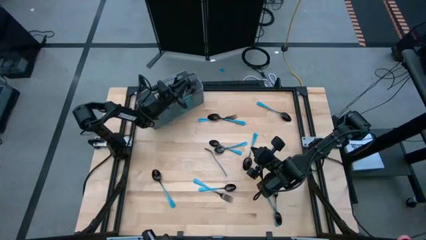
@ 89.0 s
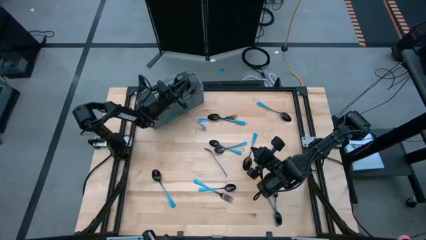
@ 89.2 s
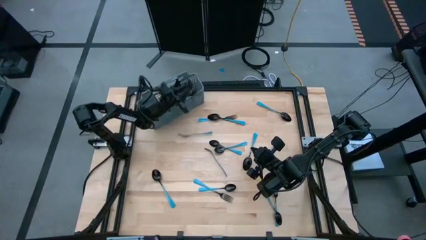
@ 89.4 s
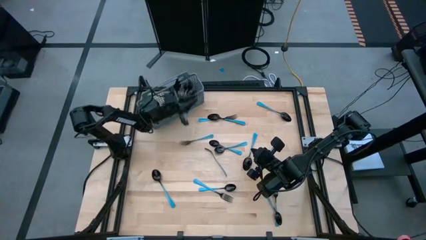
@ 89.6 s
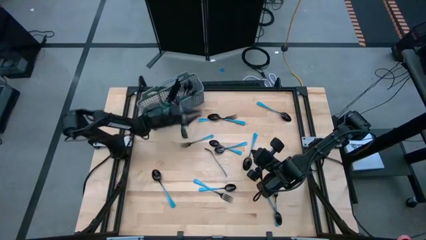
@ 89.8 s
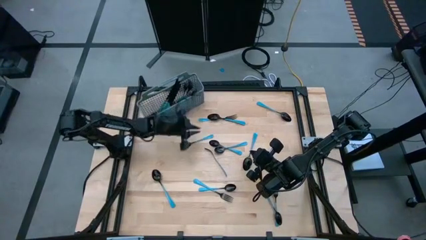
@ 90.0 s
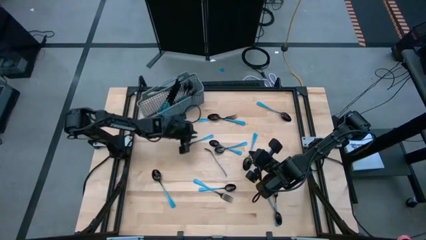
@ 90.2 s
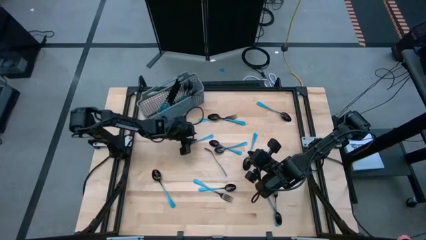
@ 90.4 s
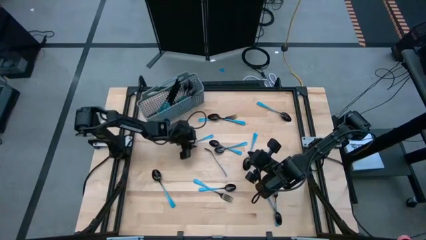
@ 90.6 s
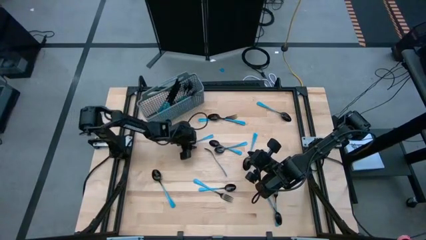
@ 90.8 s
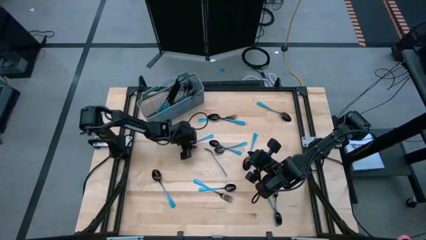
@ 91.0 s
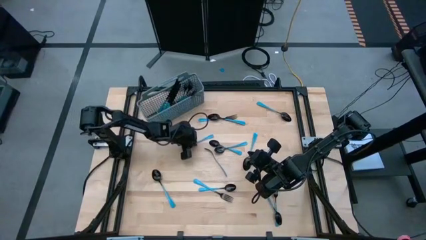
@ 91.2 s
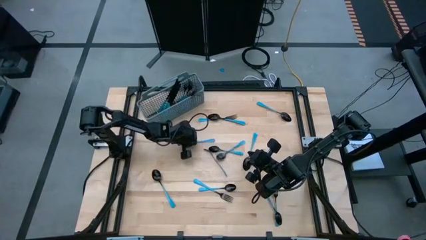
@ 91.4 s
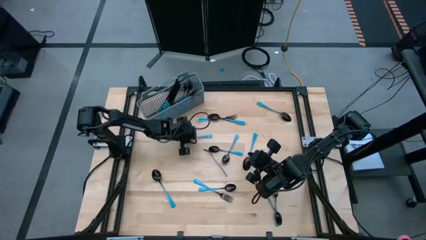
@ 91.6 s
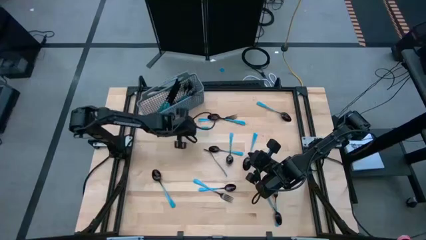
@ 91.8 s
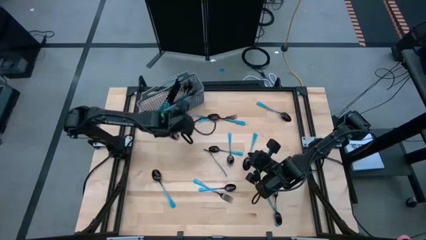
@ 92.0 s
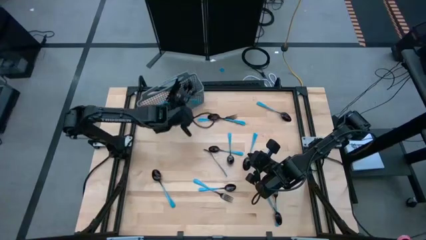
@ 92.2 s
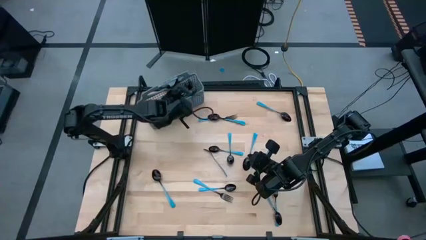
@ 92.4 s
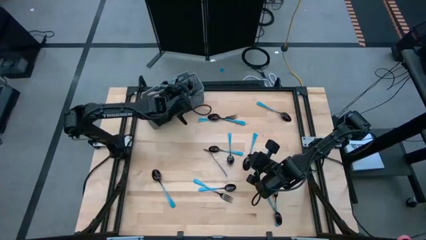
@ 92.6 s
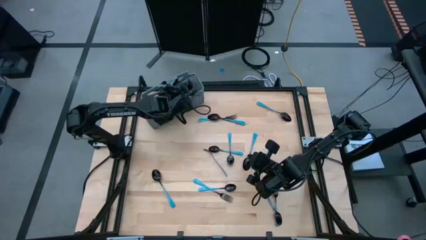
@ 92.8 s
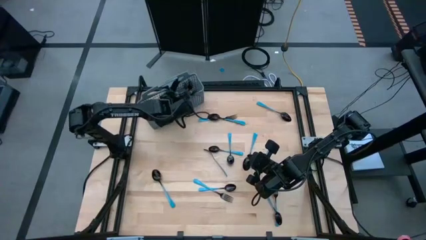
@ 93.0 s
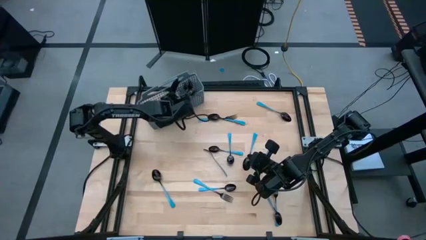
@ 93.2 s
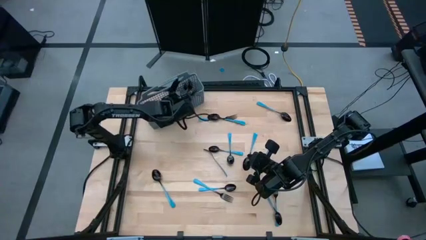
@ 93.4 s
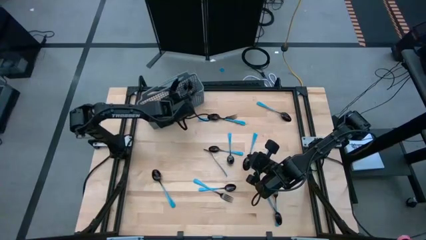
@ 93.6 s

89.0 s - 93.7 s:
Task: Sort silverware
Put the blue fork in the silverware rack

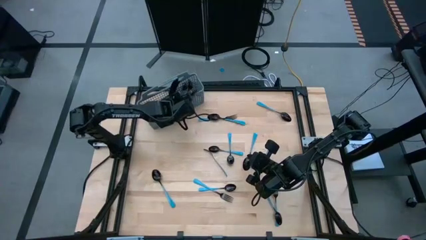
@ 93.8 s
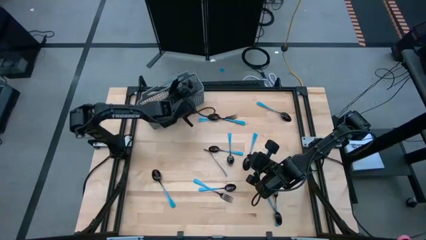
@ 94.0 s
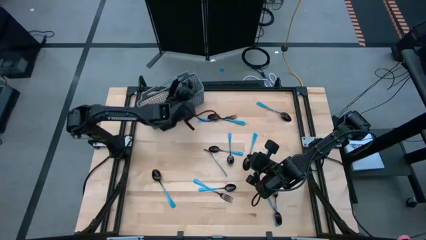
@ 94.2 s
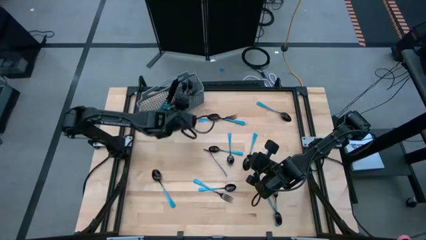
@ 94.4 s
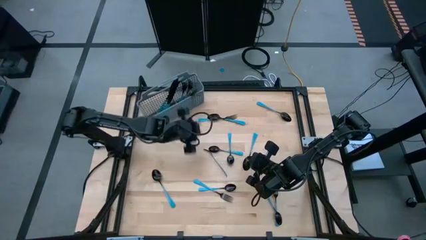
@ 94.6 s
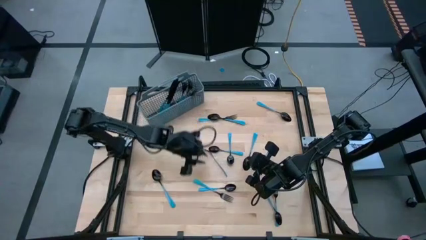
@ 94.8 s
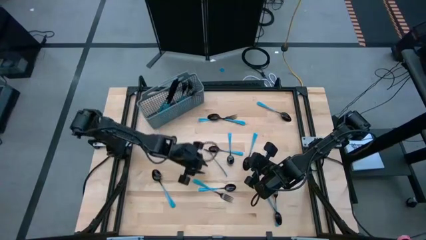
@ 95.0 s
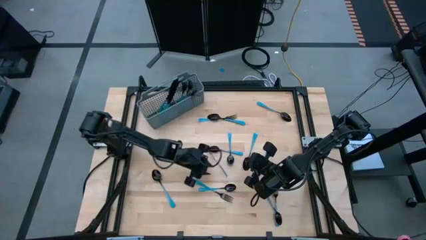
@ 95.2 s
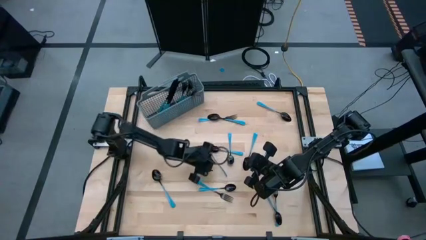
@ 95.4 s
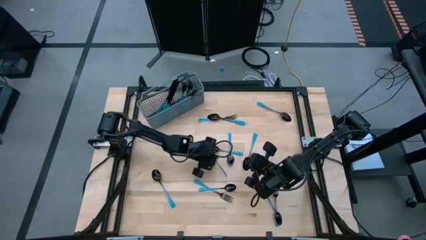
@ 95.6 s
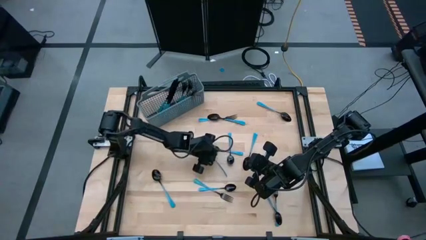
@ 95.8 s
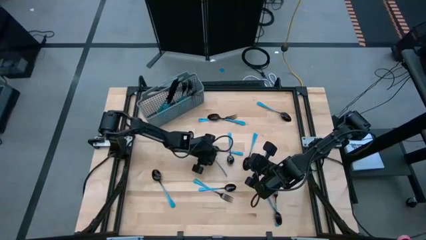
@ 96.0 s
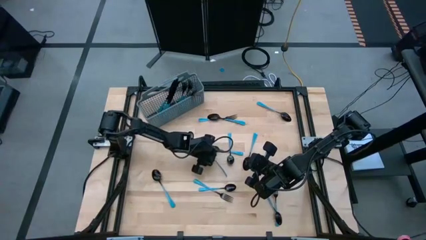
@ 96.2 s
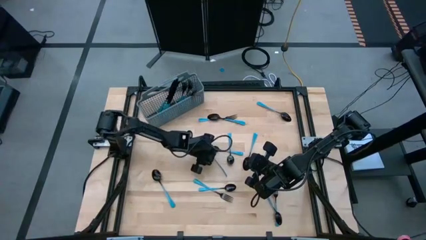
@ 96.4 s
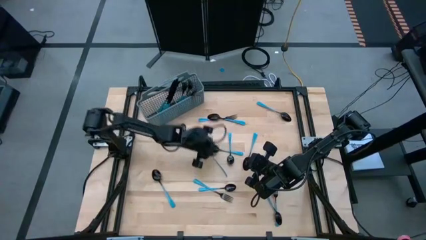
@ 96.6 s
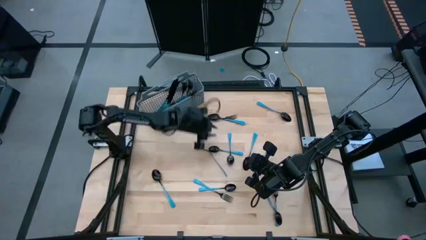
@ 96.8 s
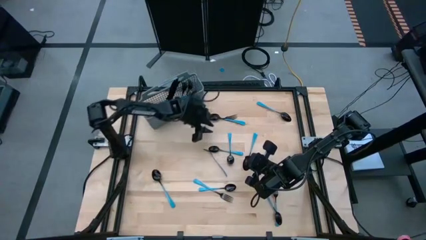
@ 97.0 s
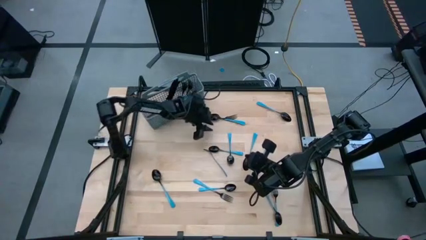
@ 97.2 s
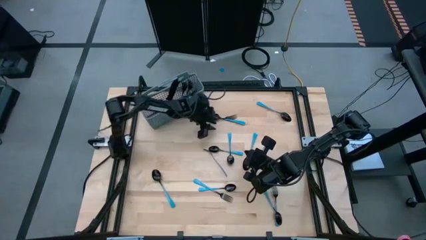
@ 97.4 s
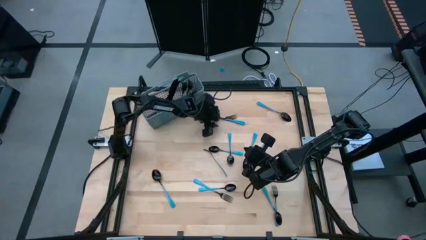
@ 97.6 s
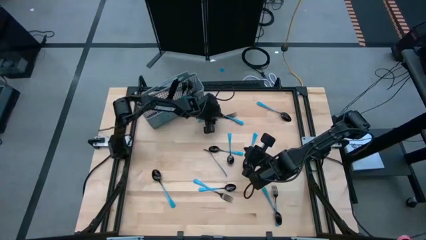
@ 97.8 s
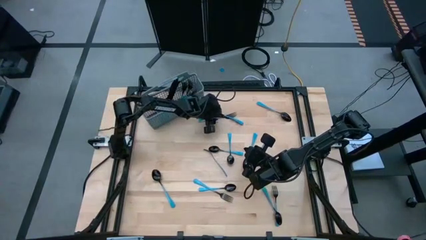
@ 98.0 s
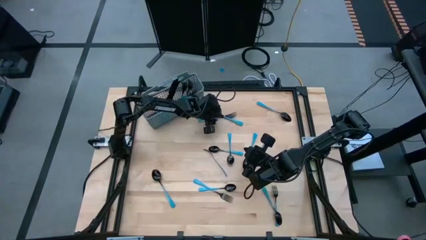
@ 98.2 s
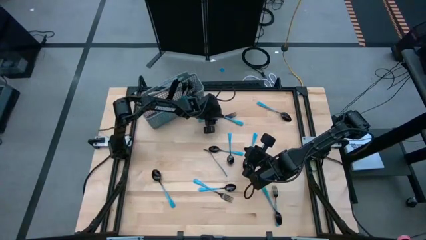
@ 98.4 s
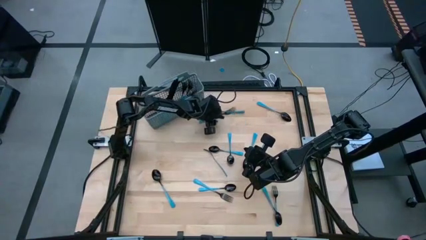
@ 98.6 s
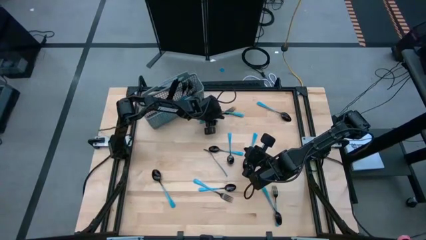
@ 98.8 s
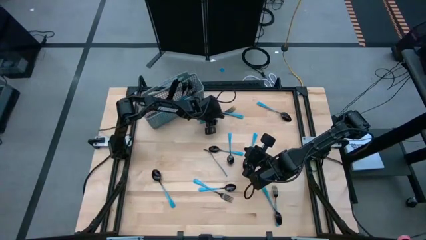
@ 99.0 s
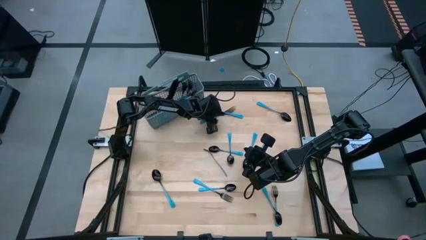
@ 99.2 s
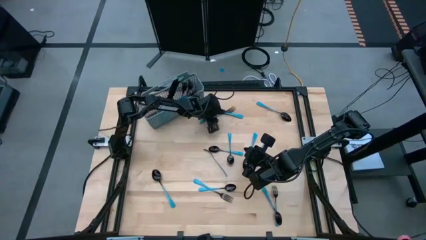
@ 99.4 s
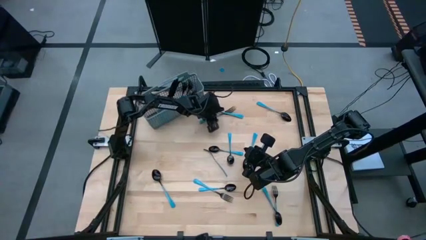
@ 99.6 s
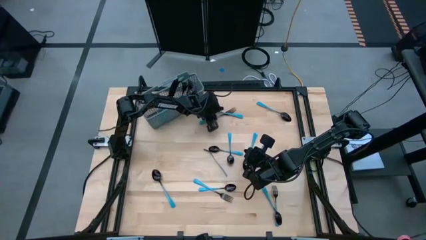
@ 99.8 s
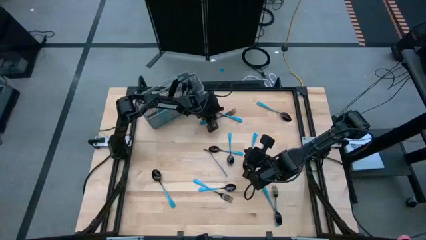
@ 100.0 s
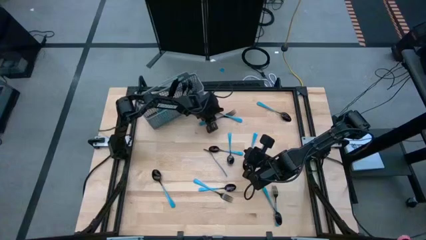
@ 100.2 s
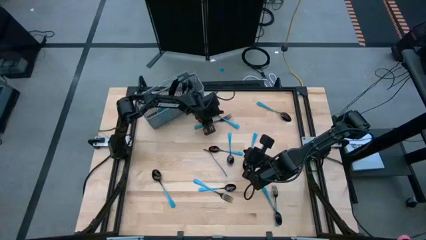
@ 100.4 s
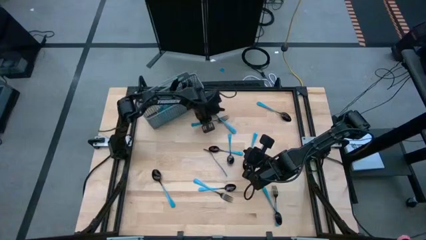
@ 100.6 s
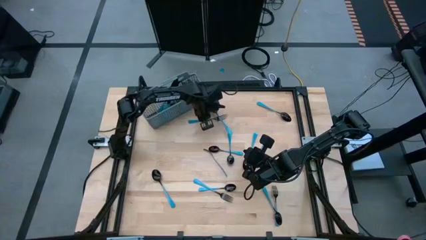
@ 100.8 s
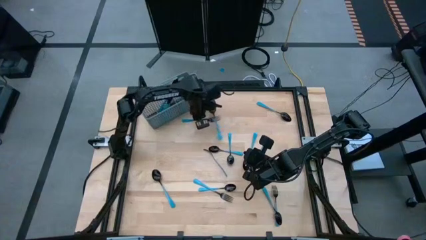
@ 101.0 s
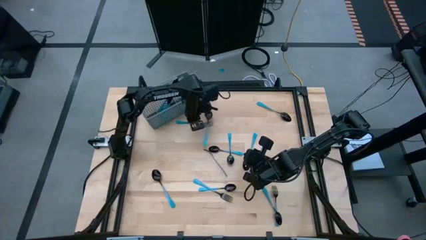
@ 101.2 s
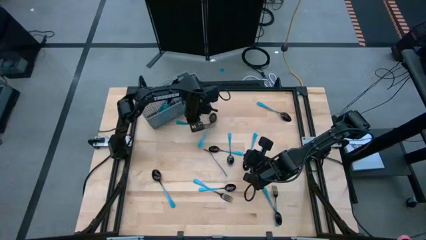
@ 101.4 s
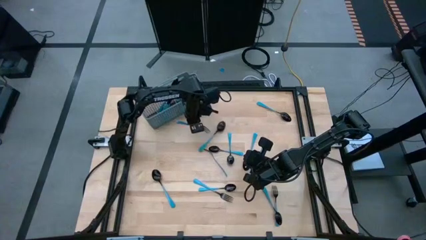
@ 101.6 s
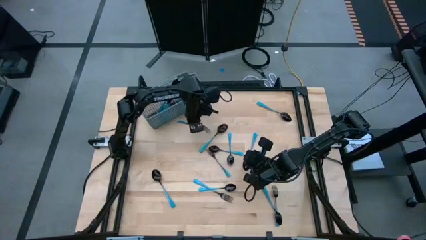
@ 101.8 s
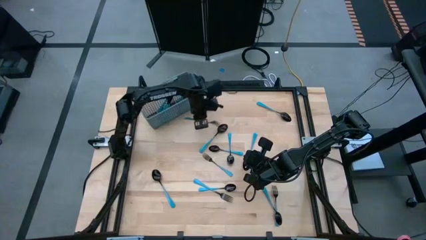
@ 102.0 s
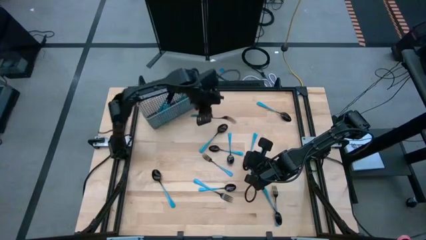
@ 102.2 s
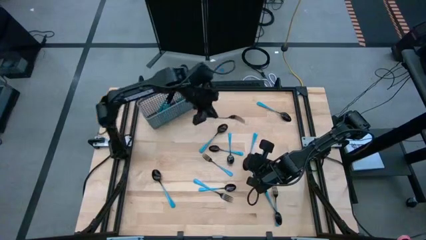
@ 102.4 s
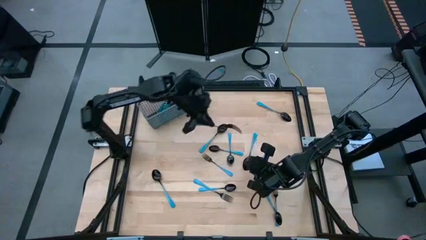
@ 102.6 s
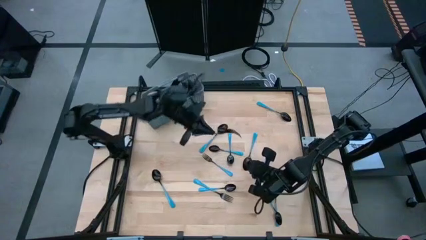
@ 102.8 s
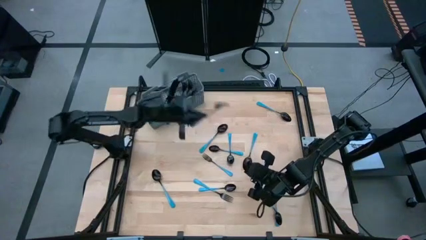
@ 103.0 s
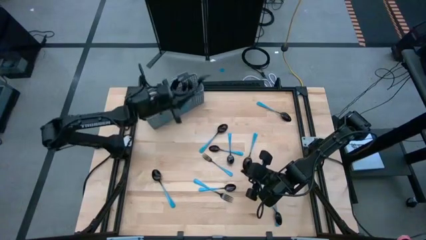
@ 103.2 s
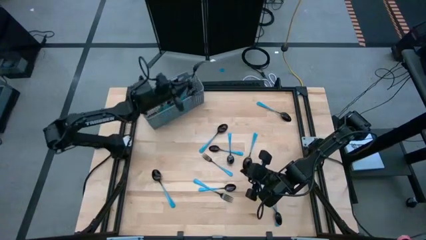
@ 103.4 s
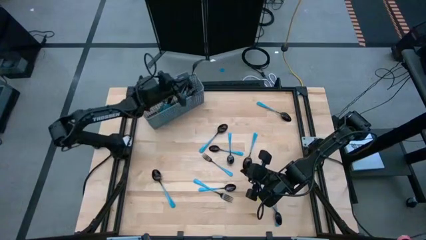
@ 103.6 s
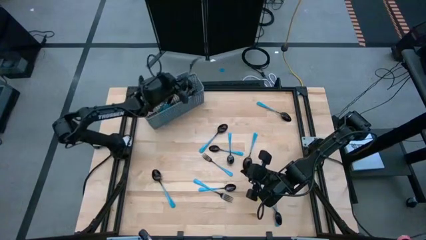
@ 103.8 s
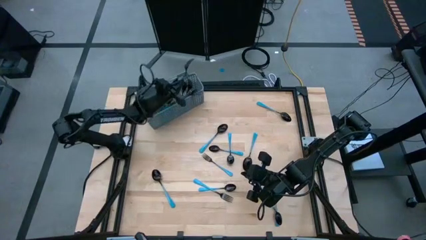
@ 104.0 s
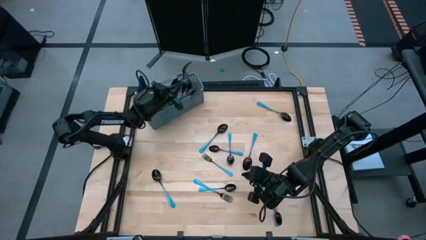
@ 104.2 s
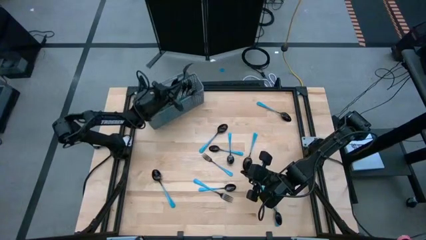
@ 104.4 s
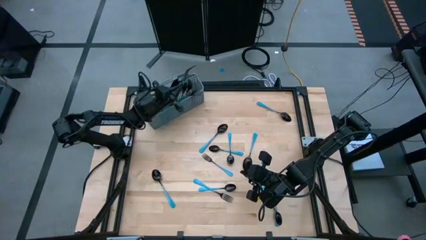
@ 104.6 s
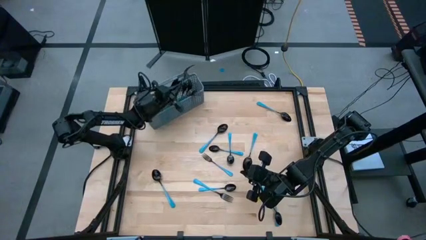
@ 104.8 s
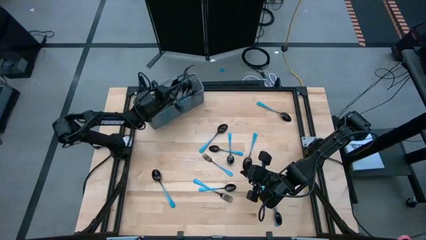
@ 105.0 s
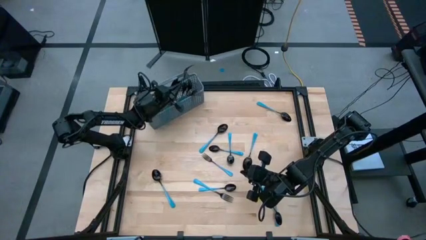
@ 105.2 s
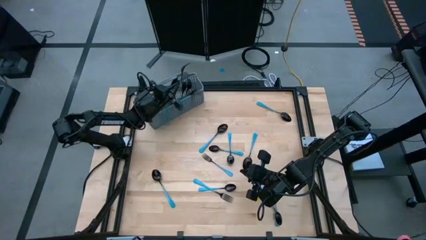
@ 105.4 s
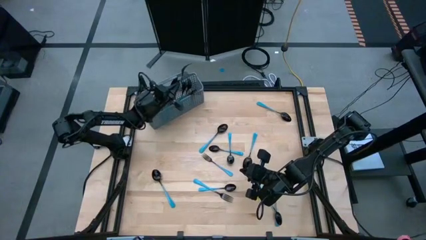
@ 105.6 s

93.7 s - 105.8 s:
Put the blue fork in the silverware rack
